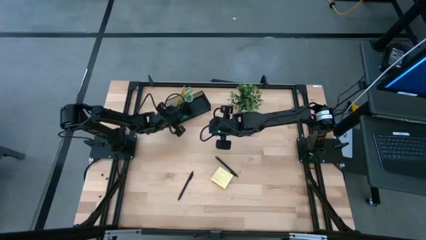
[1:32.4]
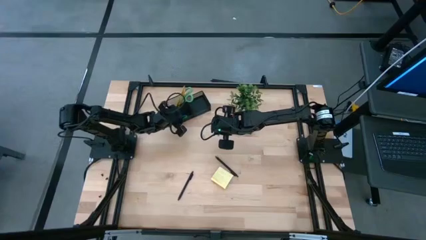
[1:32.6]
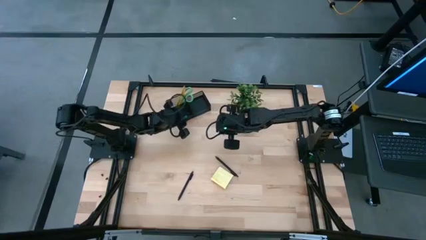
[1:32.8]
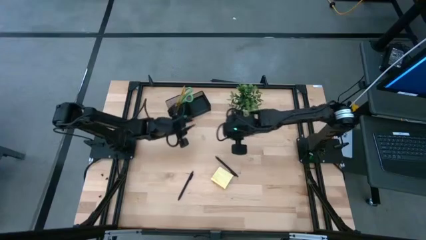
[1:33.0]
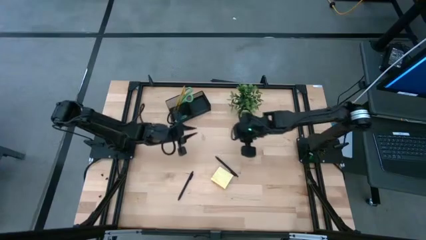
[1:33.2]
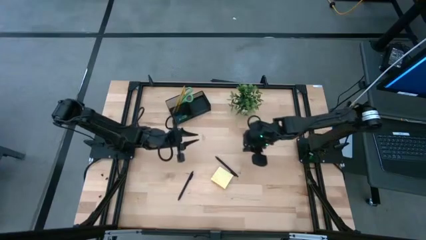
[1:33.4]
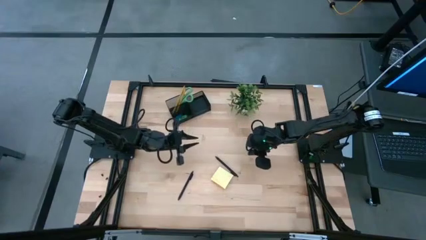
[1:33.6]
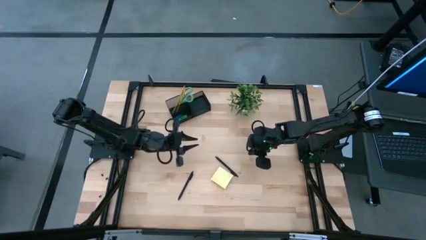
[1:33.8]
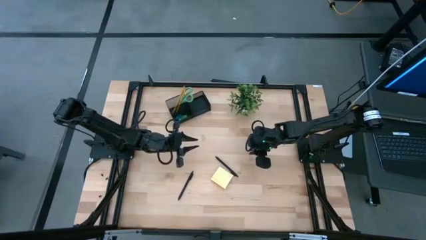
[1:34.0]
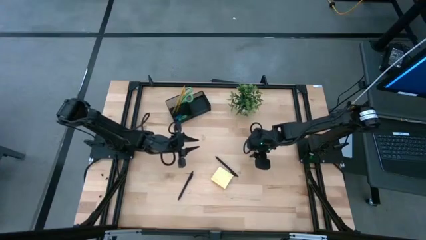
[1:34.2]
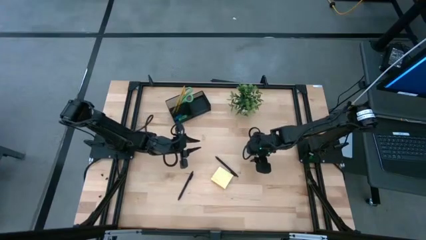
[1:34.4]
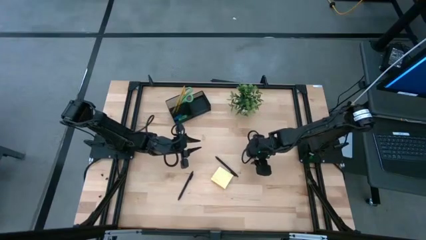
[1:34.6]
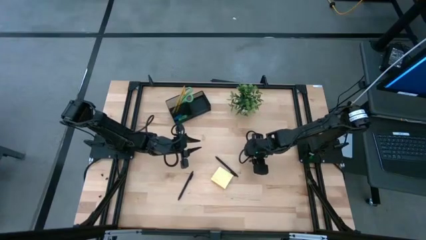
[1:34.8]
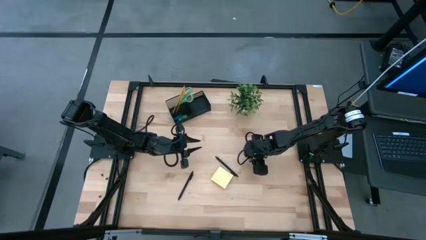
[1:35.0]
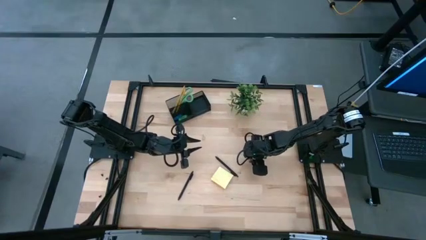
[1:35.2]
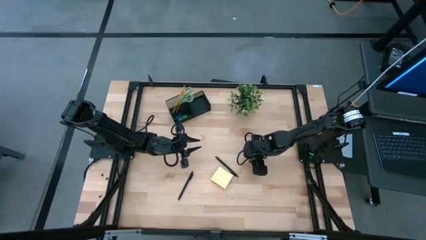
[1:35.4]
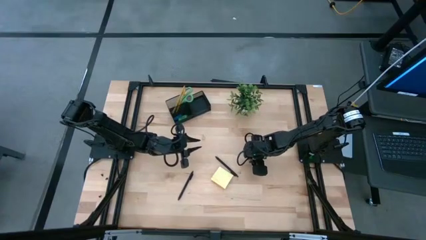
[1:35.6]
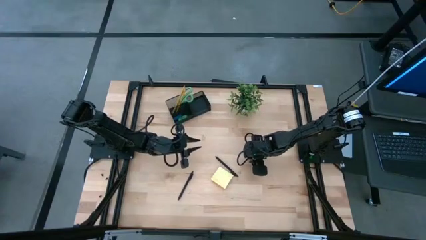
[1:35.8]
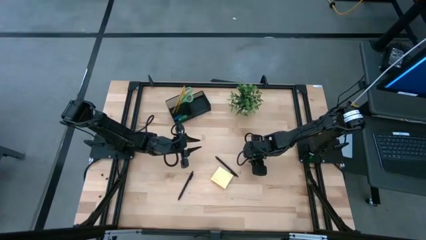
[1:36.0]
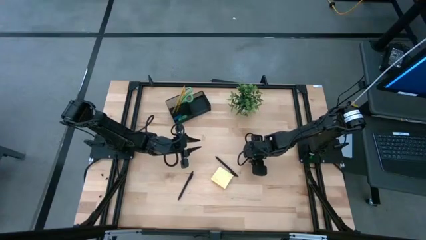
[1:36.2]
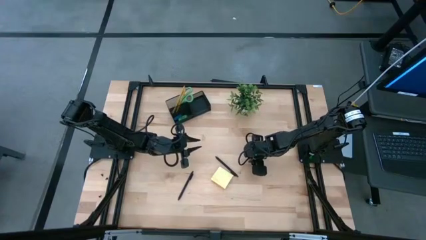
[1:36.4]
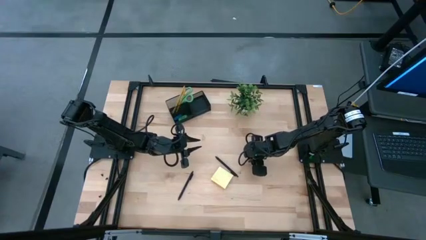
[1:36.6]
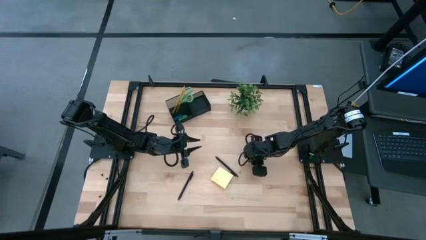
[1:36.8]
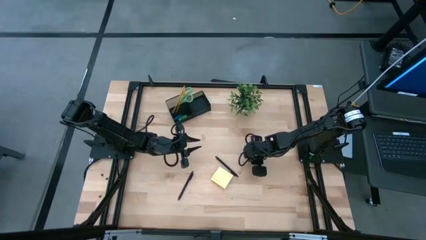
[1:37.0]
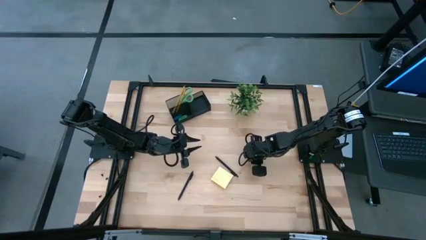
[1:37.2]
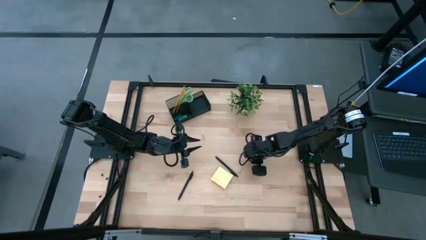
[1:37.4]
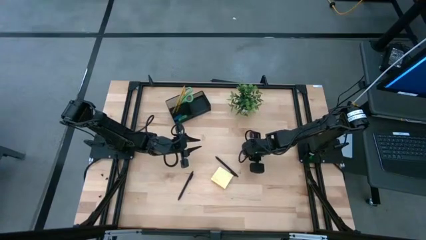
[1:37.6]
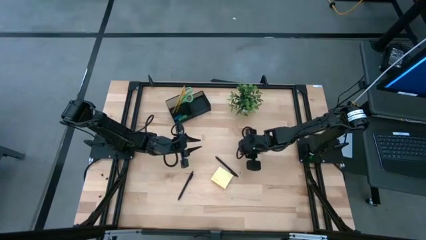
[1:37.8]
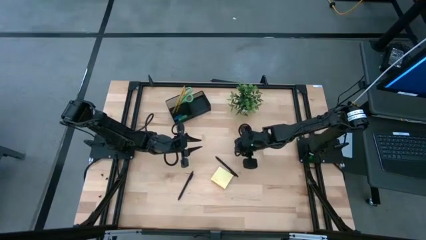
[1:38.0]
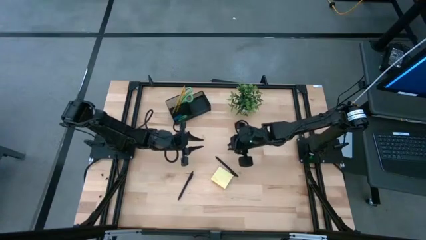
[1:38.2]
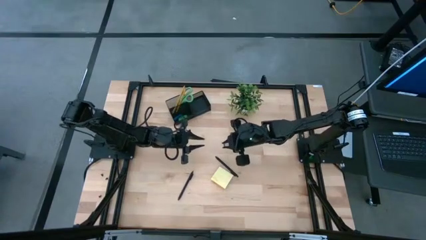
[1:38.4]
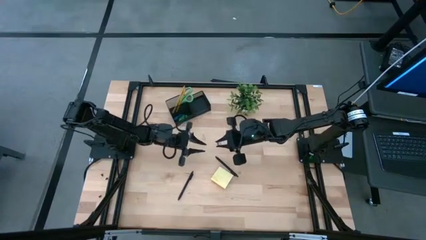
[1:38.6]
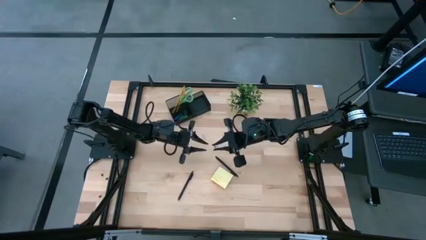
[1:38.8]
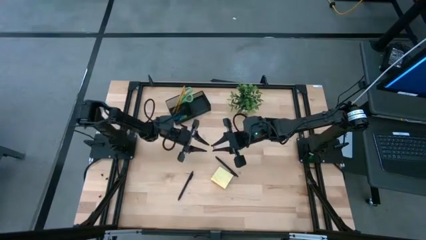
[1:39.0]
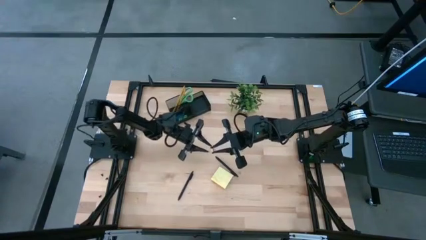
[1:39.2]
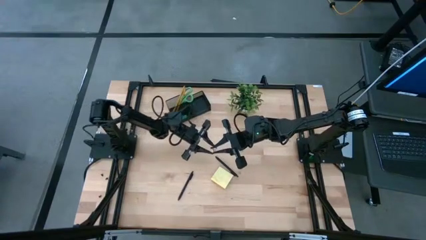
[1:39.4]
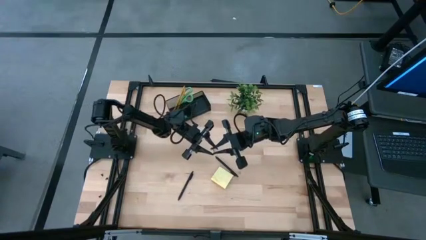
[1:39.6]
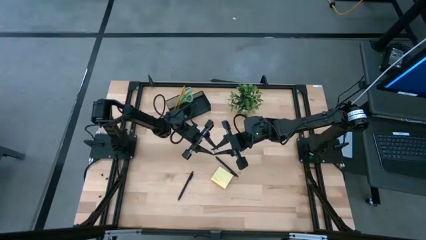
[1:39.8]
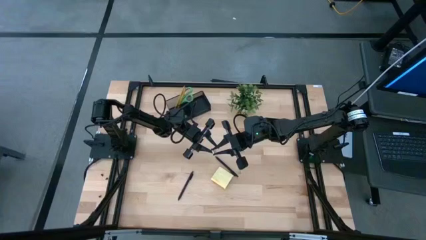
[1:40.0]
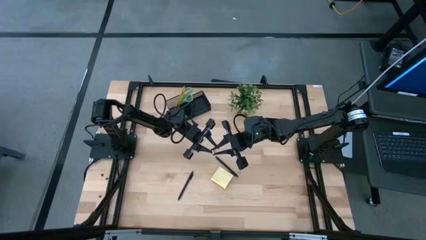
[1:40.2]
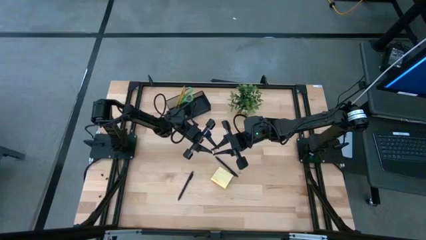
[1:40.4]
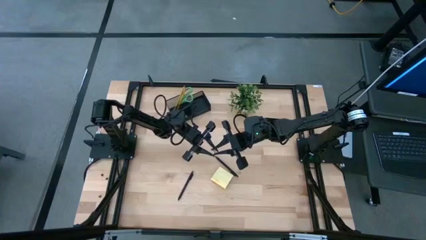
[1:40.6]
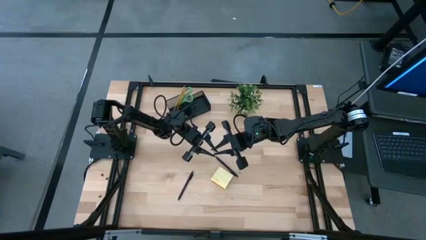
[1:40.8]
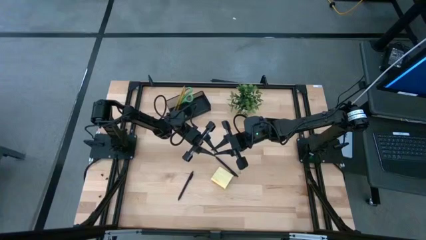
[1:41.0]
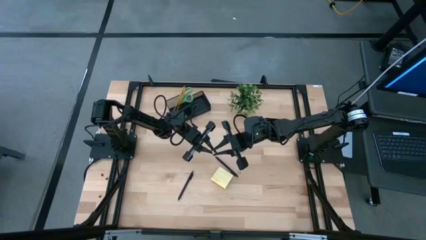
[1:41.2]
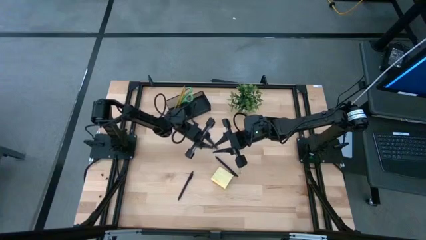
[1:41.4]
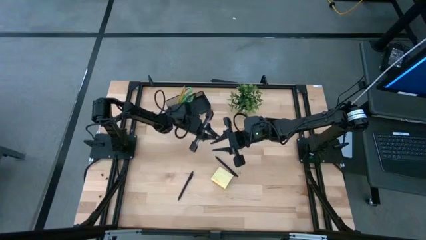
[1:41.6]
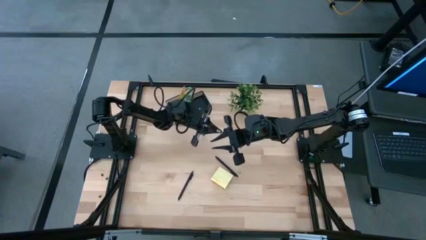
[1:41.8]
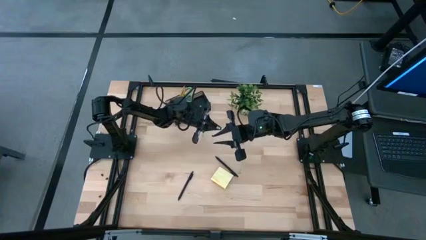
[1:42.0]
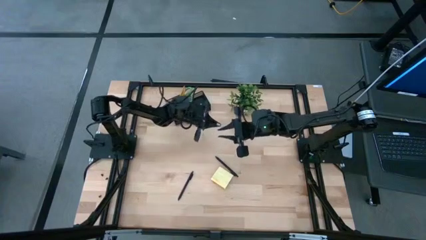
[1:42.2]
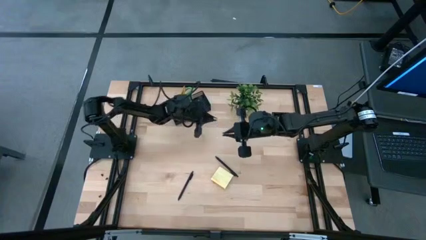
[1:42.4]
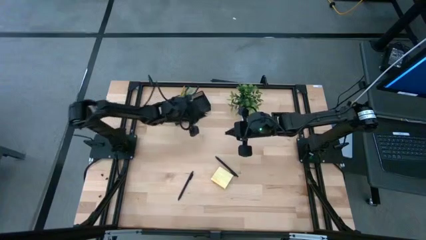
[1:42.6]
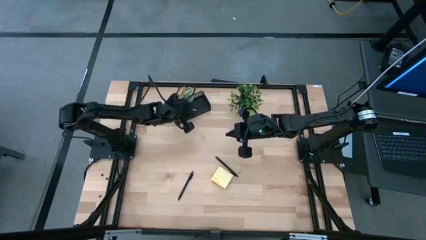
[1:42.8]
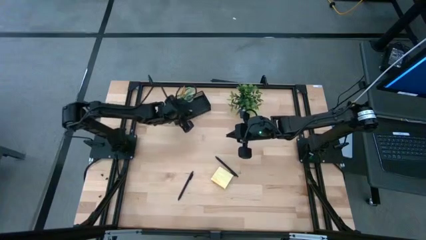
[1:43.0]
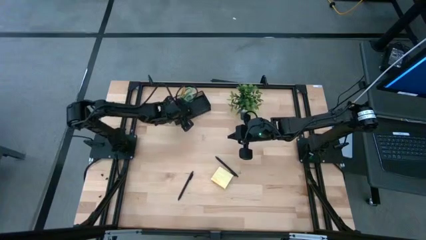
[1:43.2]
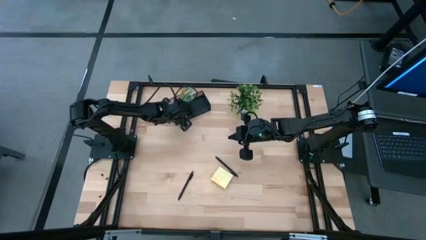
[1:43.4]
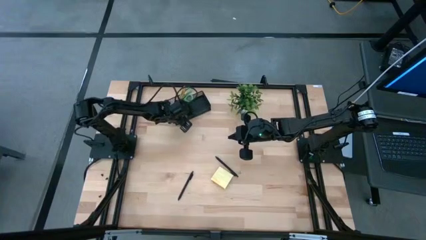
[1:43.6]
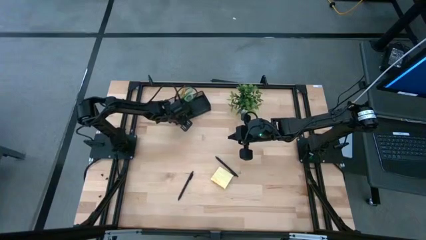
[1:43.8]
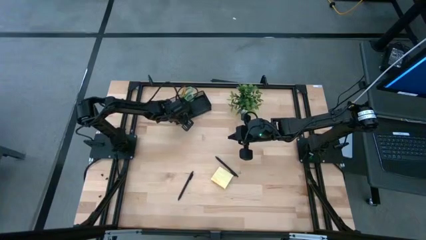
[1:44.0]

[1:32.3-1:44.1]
Task: Pick and place office supplies into organizer
Put the right binder clip into the desk organizer
